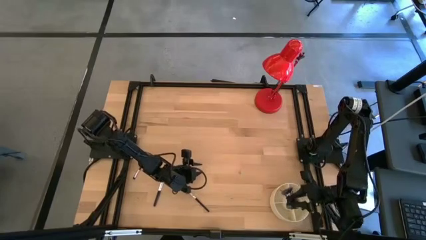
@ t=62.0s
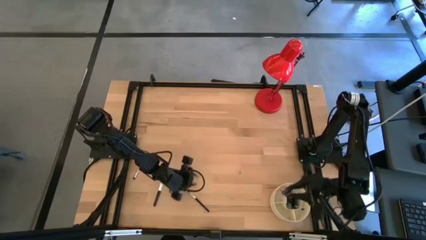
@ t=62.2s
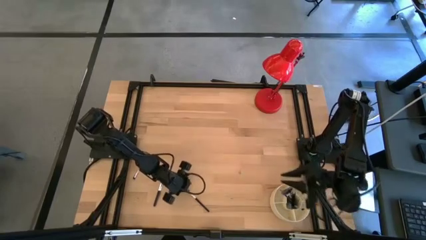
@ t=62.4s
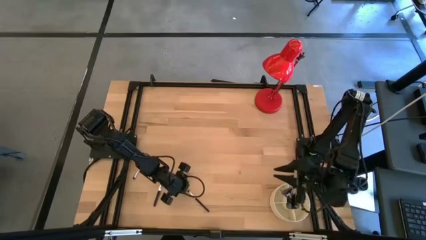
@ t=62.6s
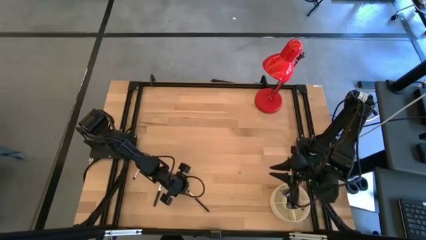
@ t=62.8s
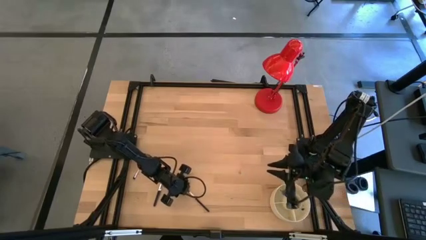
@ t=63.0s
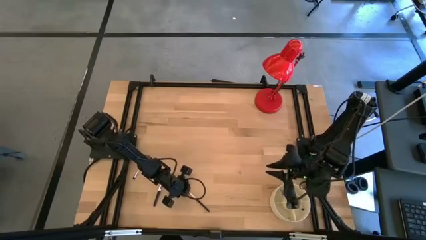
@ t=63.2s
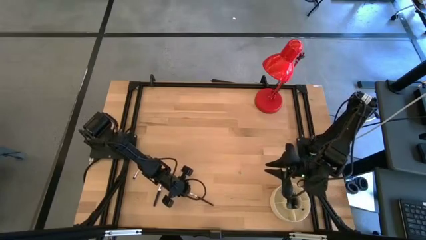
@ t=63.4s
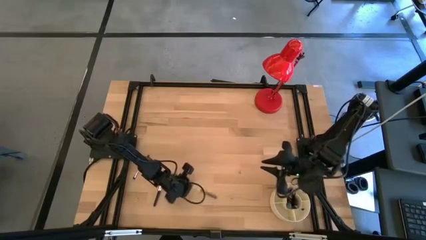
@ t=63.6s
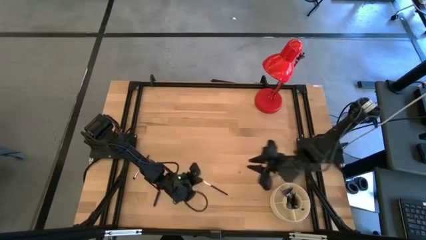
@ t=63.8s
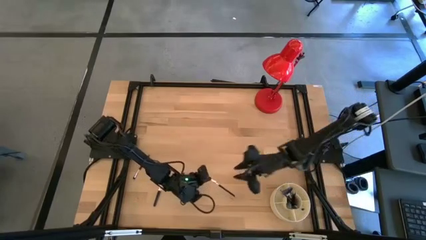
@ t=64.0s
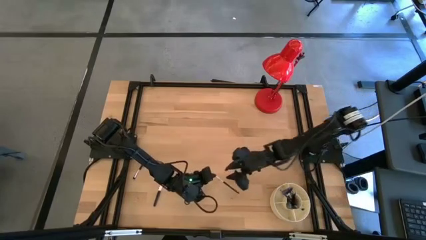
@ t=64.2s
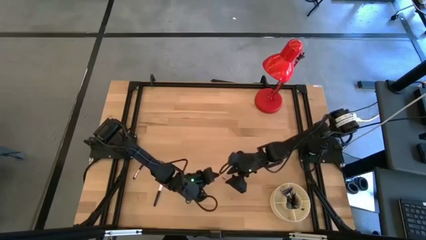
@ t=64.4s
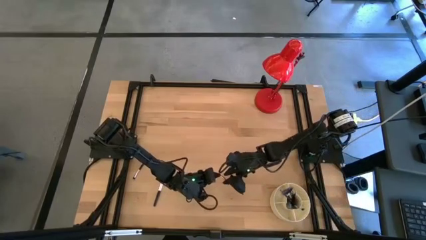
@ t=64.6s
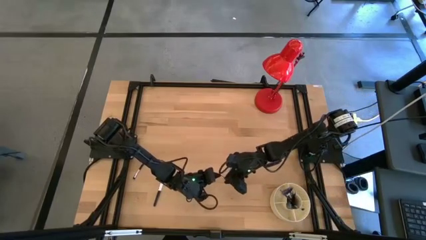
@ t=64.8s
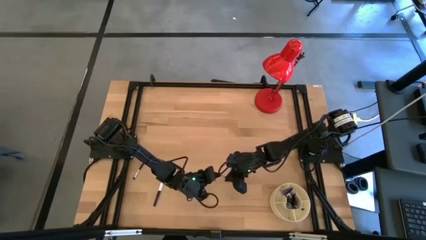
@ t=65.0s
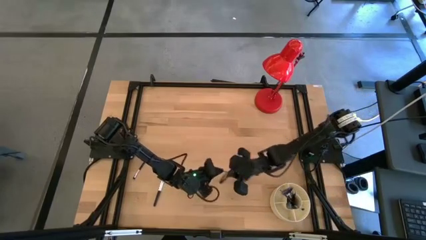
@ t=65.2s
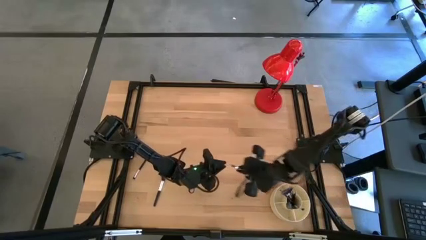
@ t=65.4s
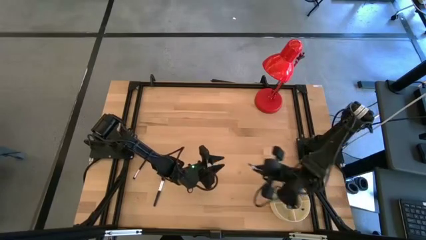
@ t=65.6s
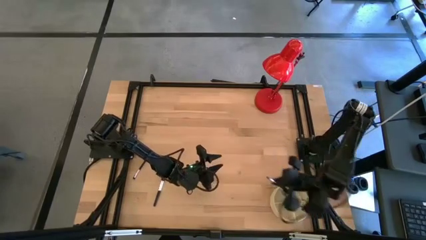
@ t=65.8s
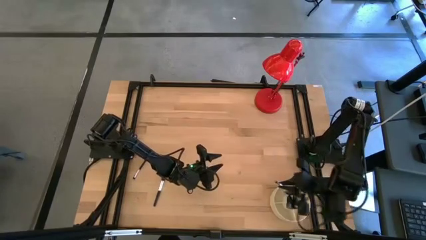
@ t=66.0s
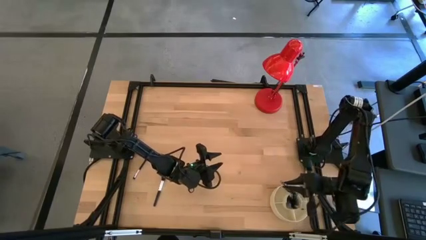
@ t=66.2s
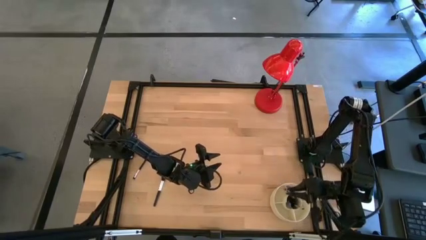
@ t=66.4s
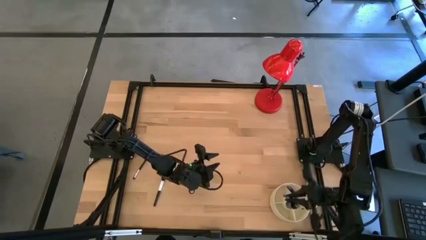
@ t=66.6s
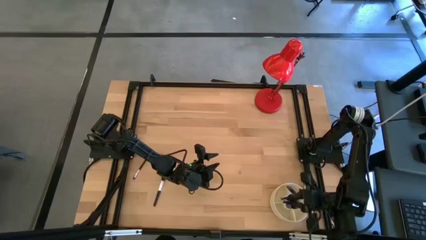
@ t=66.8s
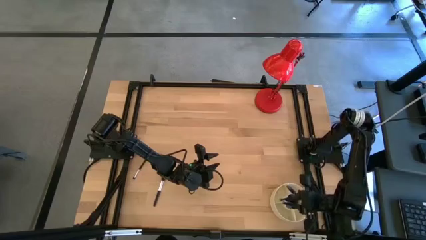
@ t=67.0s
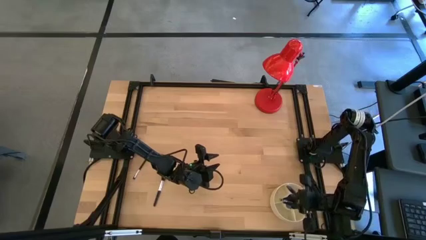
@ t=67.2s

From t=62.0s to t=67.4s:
Task: Put items in baskets/containers
Put the black eyeshadow brush into the yellow pen organizer

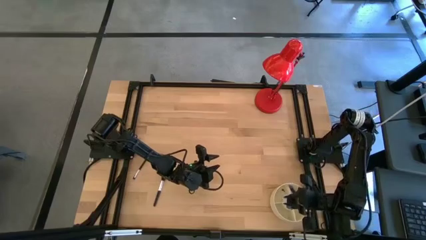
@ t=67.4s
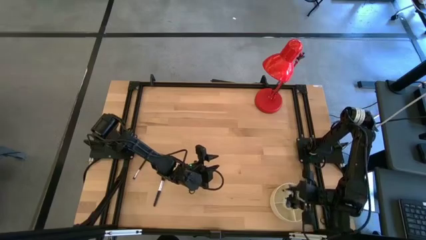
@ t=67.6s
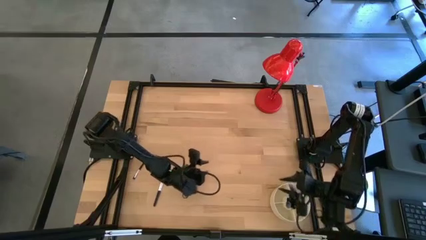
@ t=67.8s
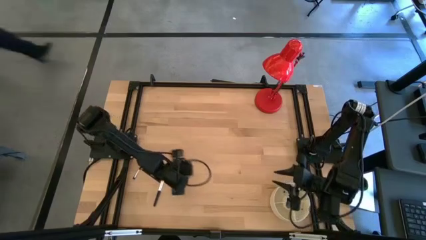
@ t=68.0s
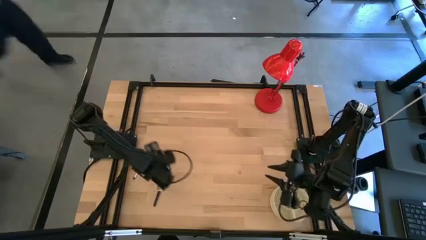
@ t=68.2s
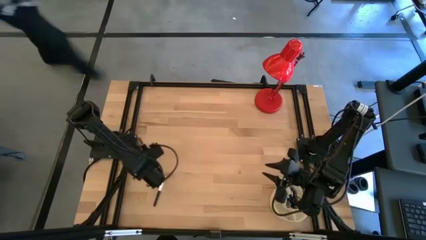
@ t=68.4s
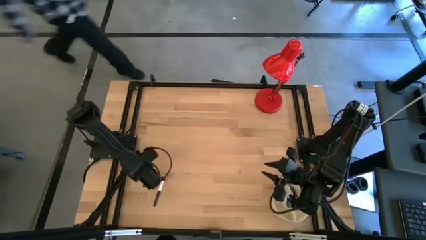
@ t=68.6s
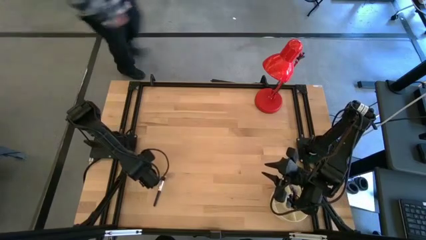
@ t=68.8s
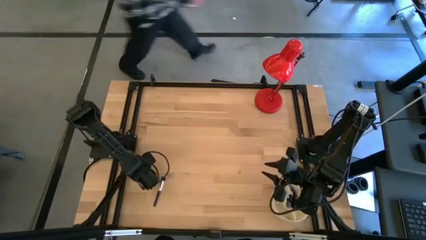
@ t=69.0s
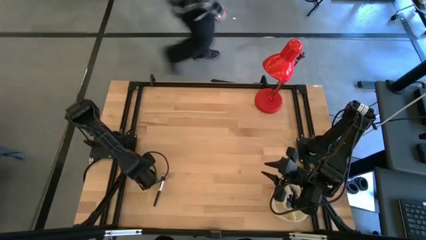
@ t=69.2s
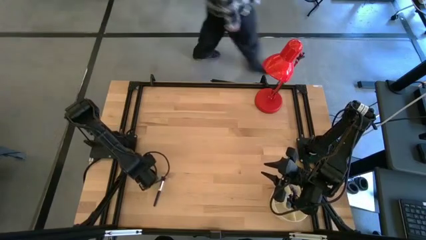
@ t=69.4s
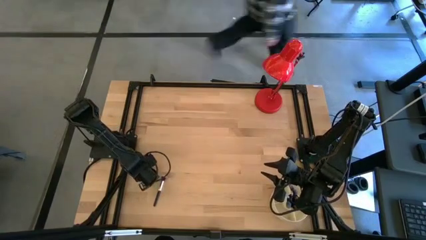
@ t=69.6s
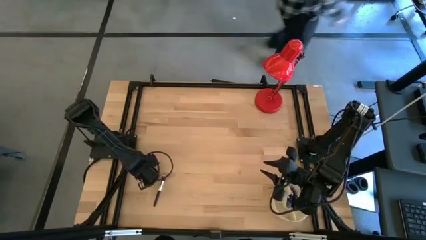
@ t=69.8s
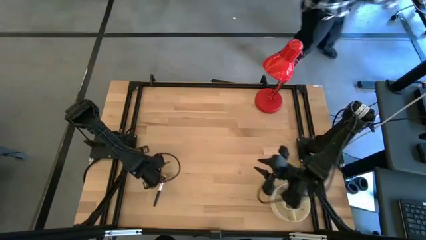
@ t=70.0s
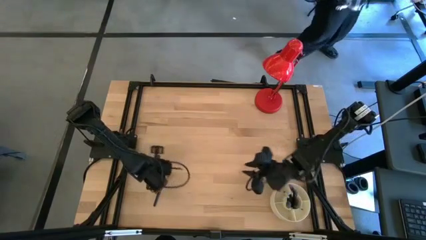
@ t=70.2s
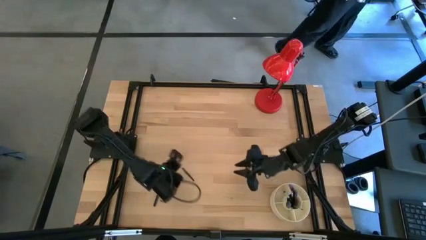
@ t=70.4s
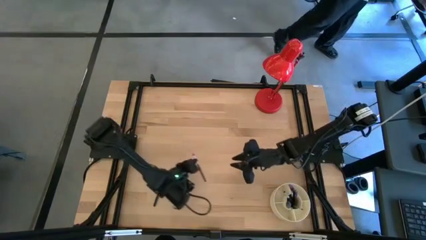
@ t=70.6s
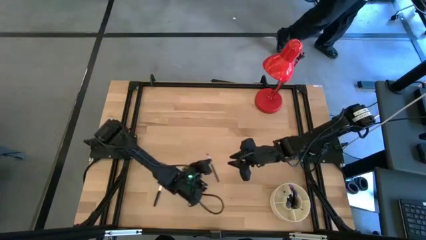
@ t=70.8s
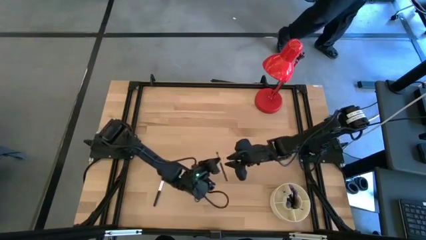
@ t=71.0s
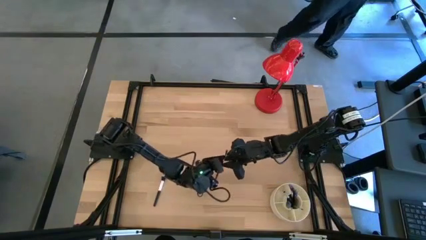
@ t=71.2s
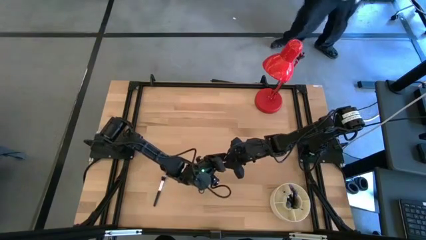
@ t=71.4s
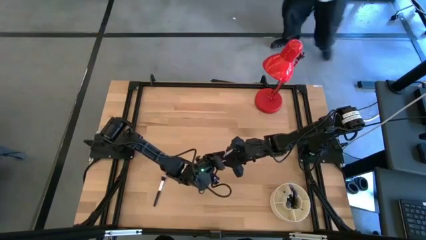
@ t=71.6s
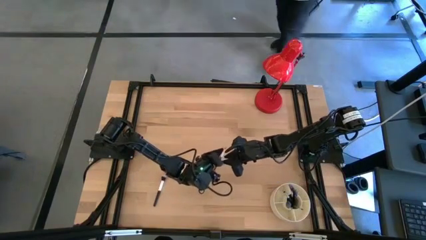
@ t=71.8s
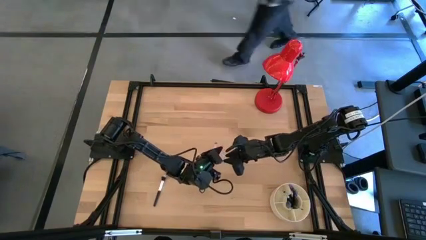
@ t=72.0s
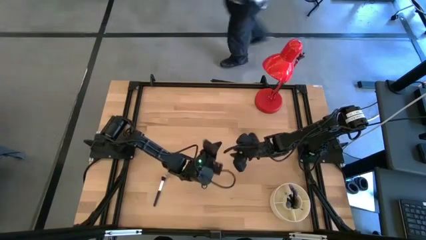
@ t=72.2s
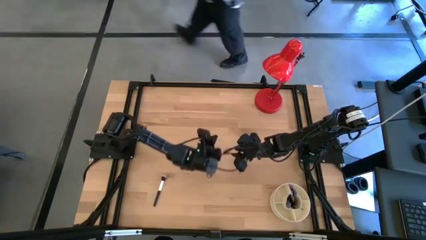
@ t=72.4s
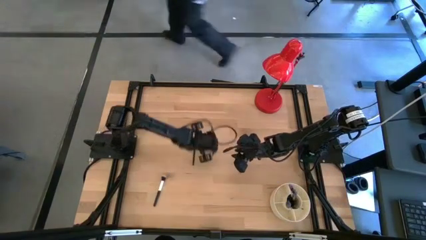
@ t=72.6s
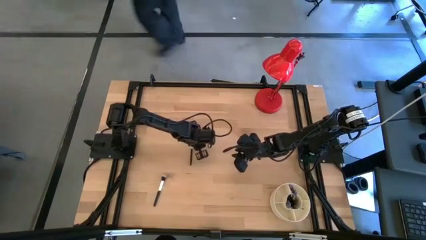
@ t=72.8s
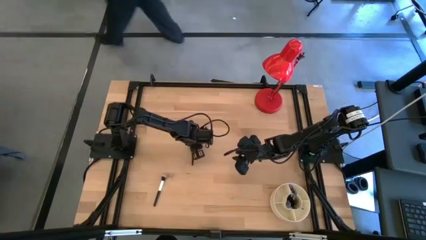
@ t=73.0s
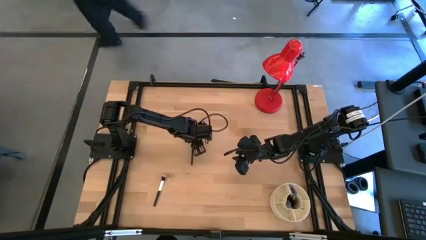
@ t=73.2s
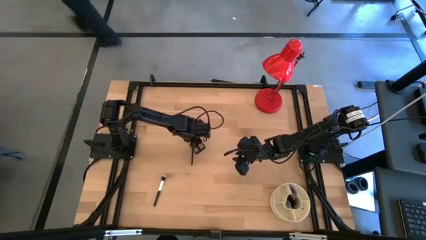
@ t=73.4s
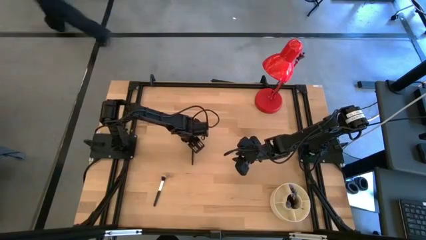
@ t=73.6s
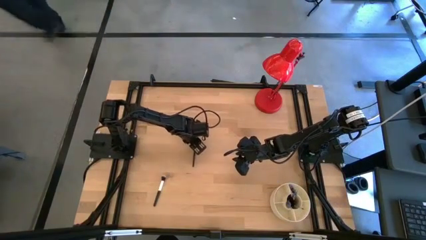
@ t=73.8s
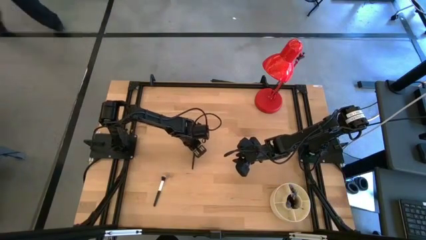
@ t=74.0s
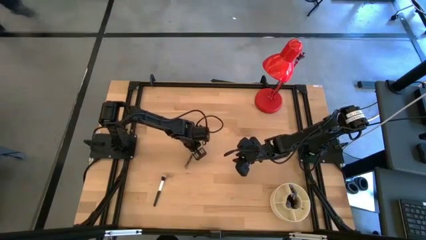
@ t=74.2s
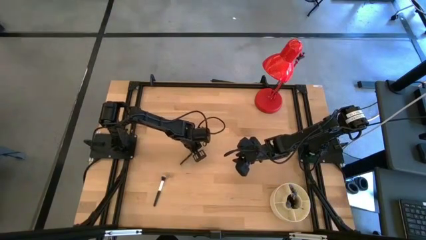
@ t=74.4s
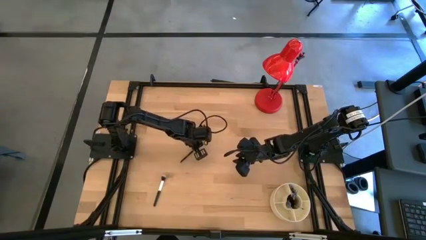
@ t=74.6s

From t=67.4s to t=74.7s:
Put the black eyeshadow brush into the yellow pen organizer

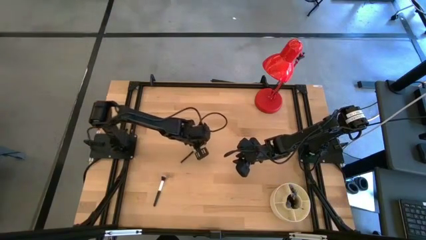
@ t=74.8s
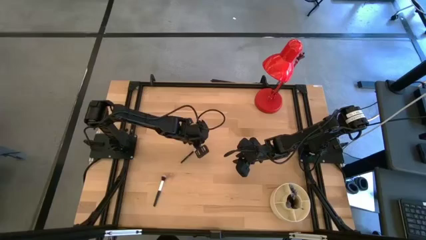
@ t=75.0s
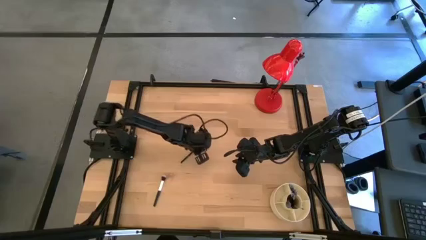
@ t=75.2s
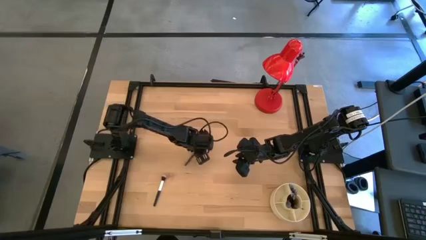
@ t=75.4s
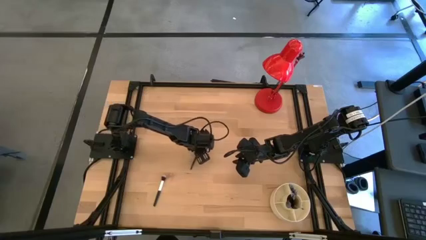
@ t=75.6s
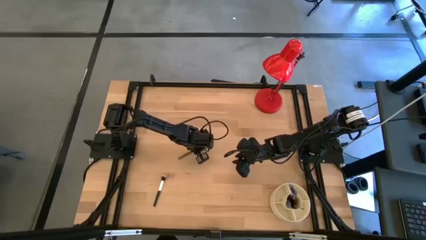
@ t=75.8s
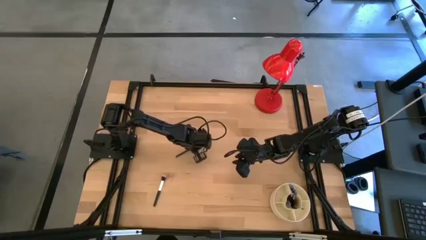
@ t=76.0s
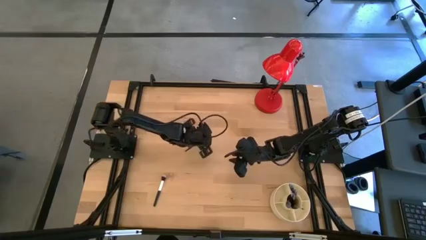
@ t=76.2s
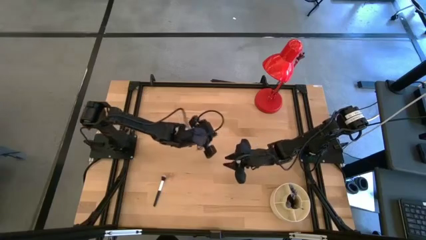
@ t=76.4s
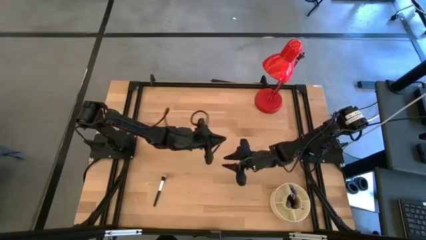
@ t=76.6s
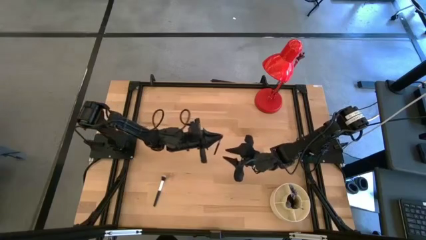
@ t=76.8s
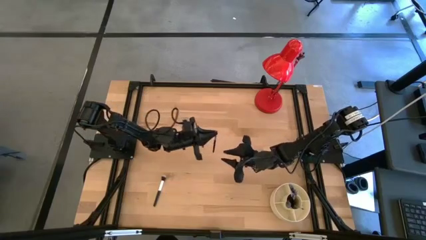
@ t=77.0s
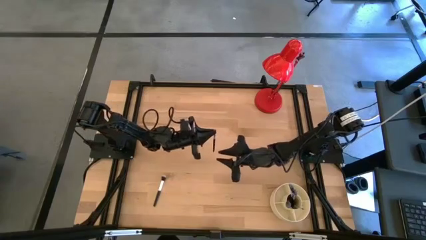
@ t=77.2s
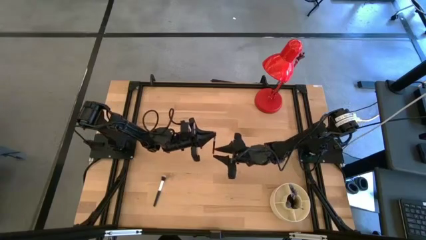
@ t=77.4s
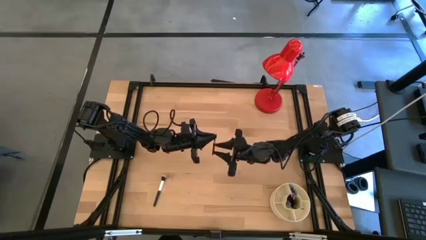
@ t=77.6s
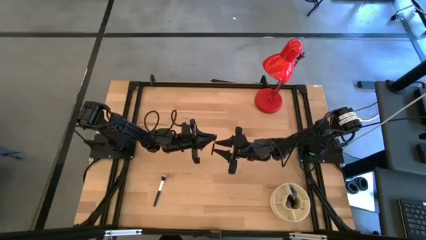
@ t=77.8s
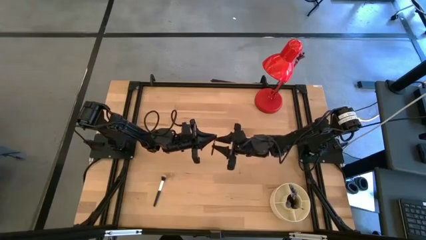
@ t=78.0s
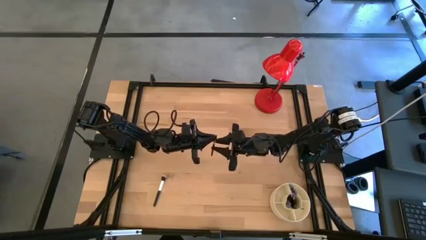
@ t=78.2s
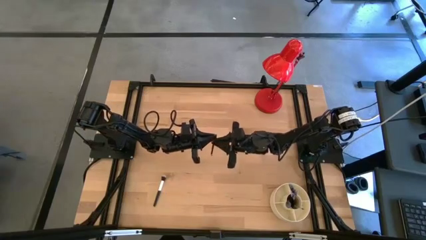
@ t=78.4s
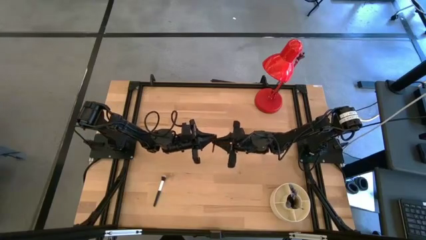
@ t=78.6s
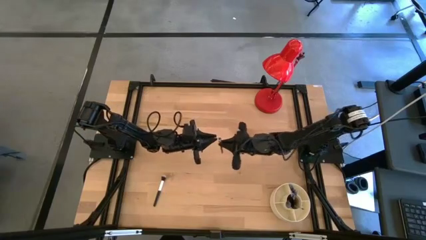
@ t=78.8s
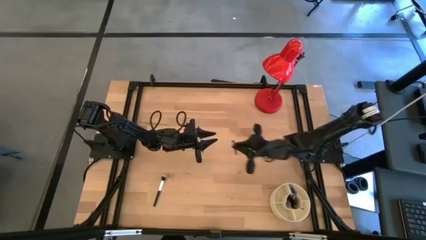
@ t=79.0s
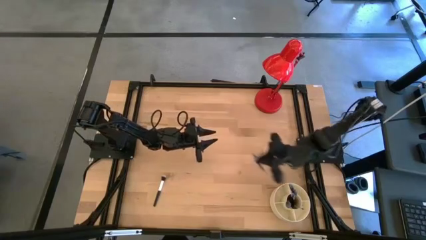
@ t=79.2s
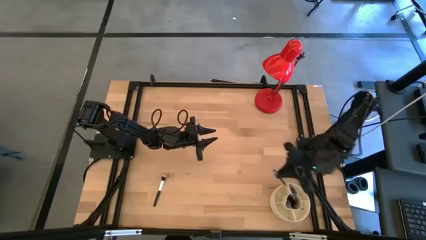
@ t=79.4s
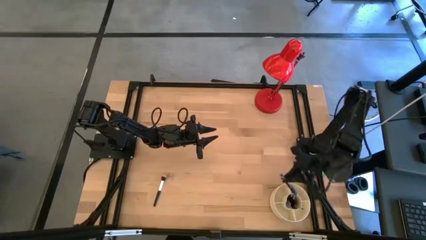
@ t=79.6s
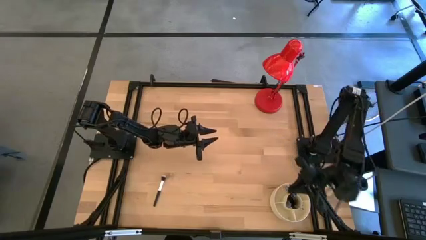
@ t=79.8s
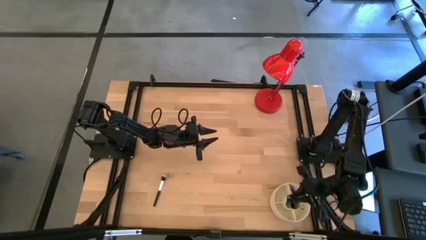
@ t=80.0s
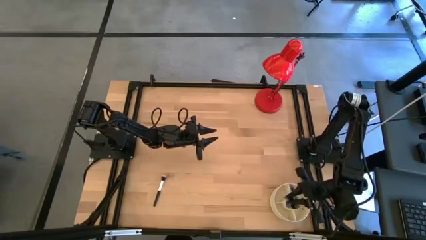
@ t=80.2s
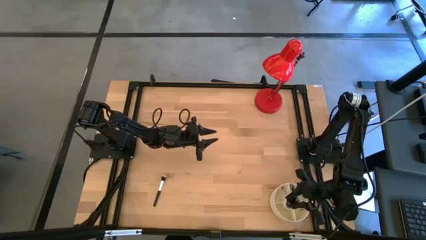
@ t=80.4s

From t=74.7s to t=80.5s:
Put the black eyeshadow brush into the yellow pen organizer
